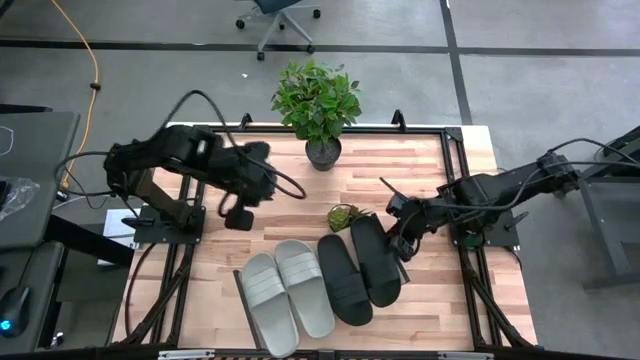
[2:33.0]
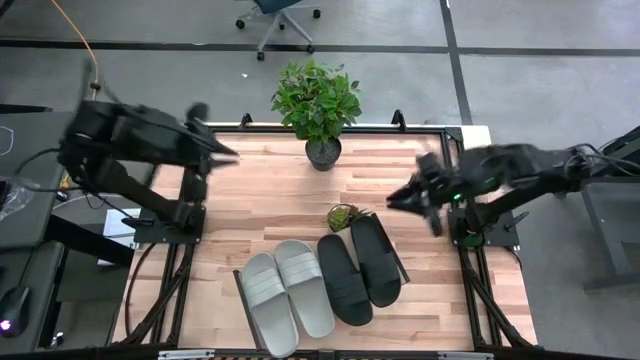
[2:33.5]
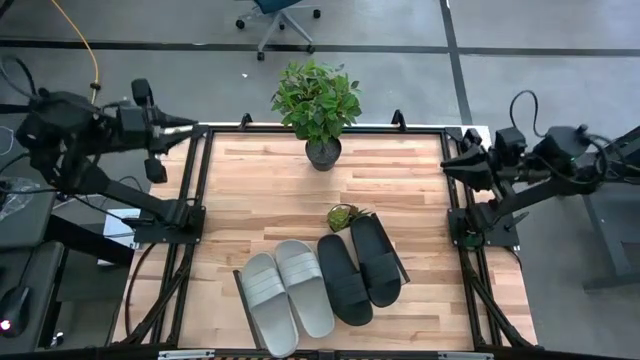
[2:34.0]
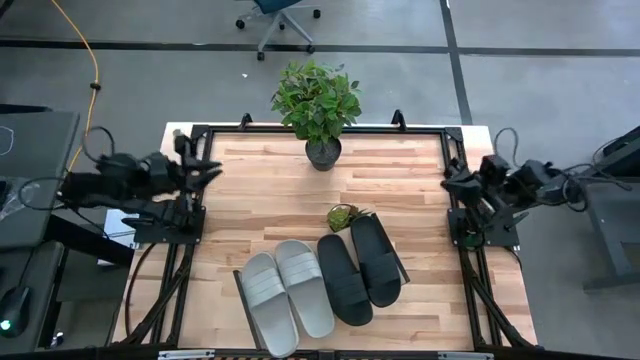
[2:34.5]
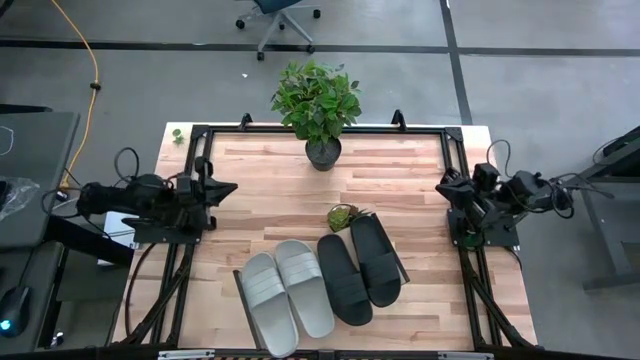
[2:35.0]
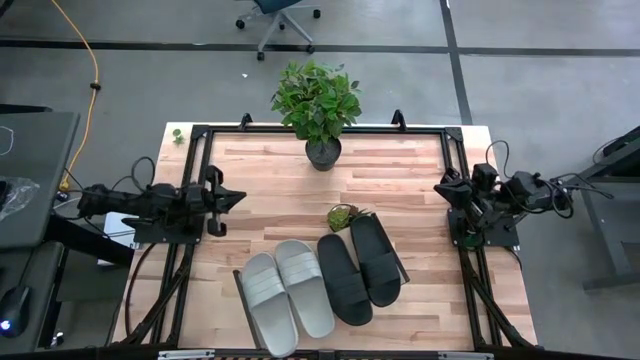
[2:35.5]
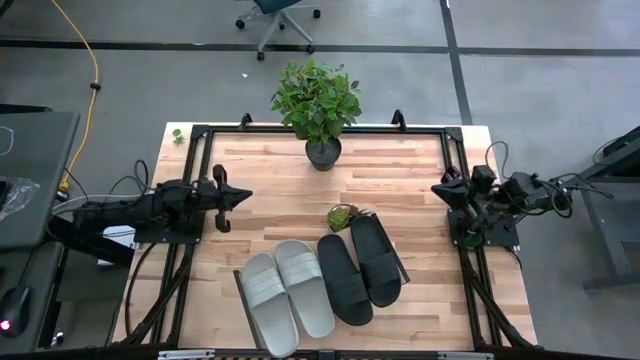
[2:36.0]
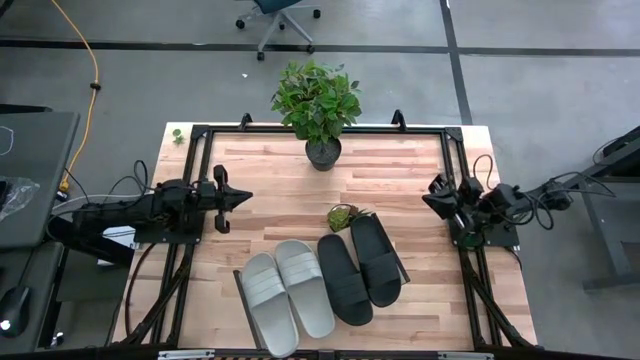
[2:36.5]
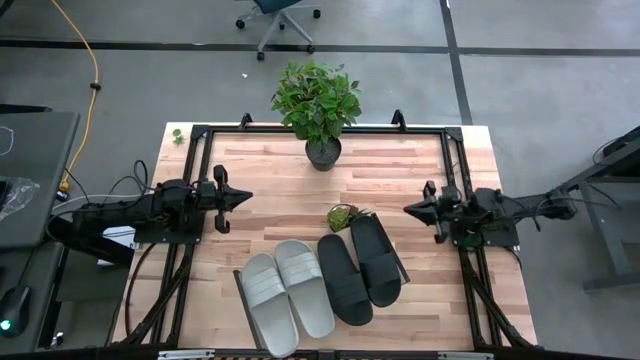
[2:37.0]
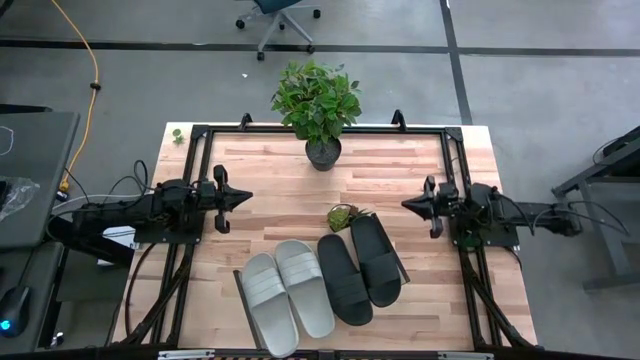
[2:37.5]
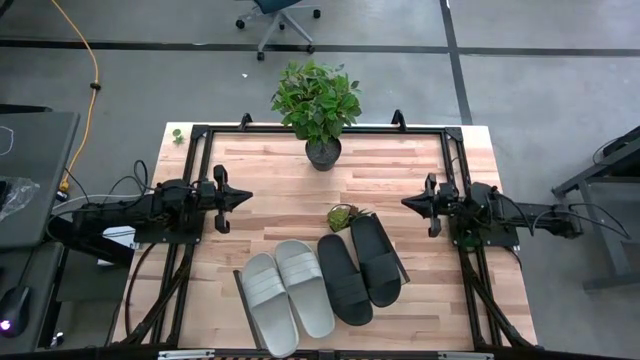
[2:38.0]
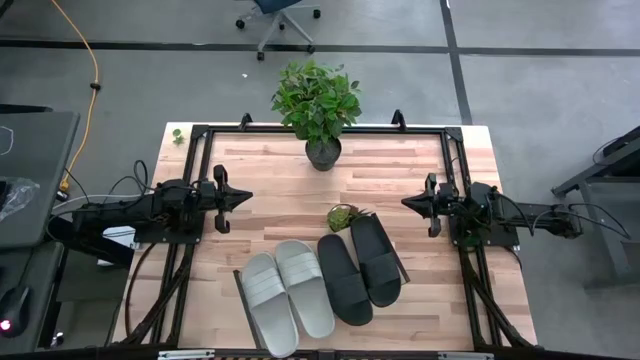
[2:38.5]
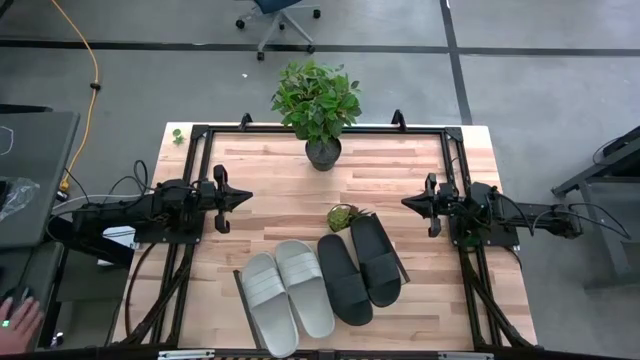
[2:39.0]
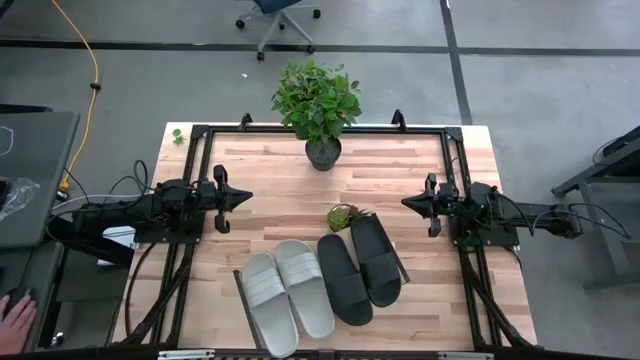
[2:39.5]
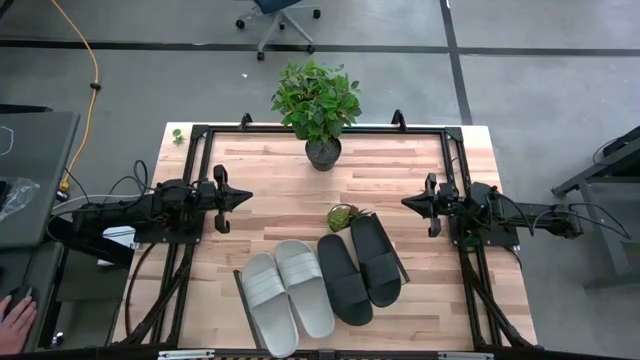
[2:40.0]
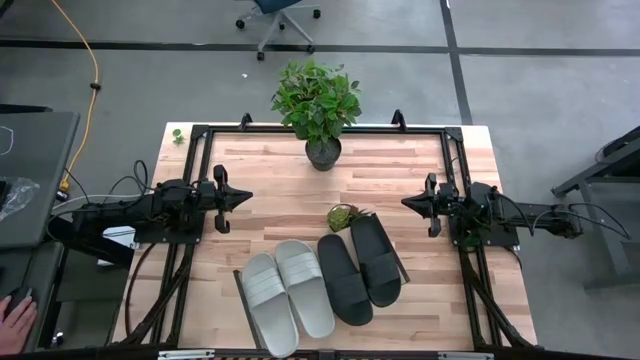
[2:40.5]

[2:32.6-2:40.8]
Task: Pick and place slides into the shelf
Return to Home Position

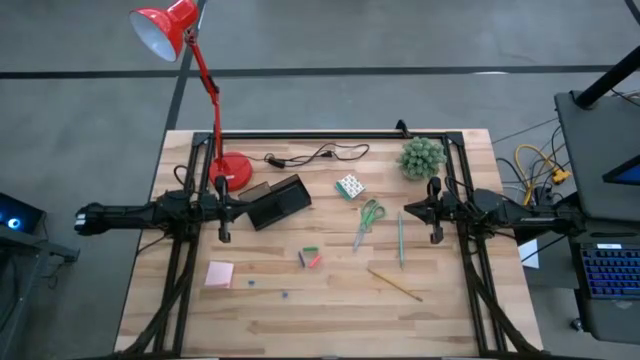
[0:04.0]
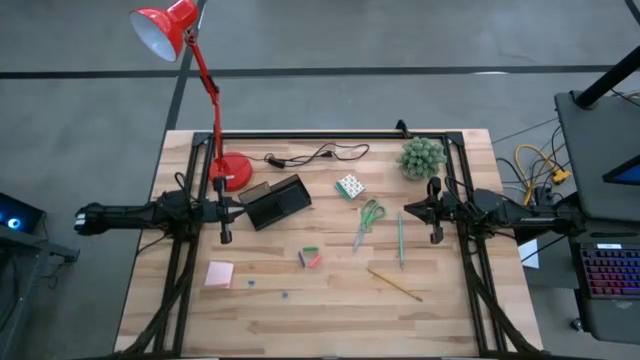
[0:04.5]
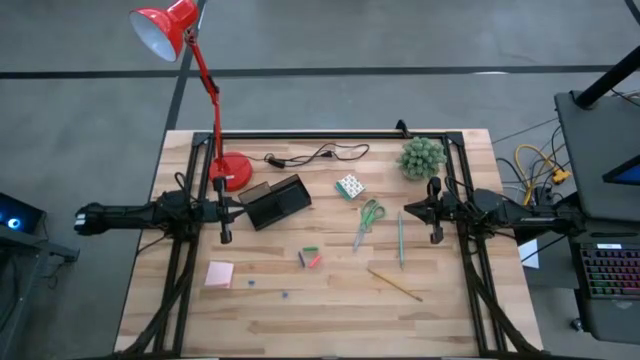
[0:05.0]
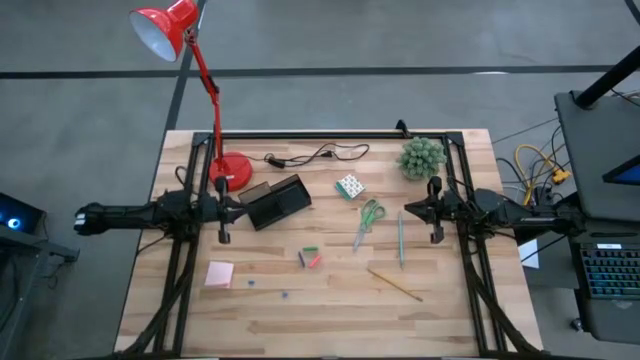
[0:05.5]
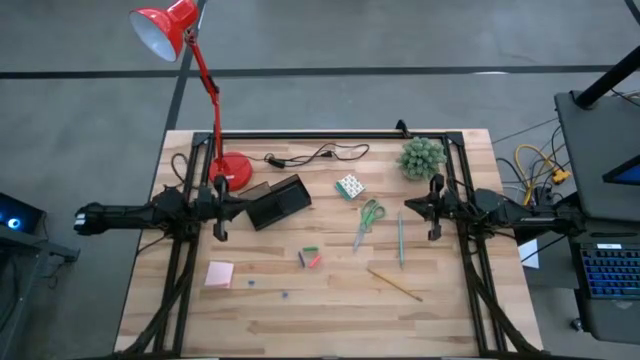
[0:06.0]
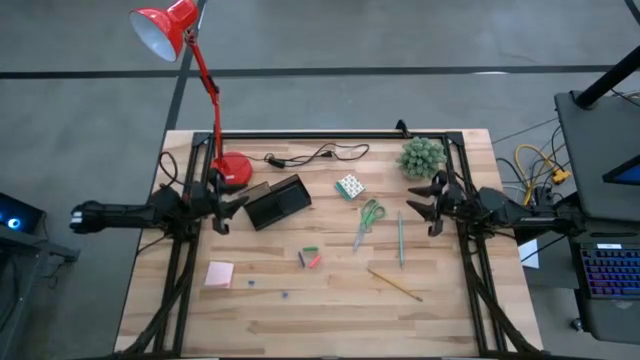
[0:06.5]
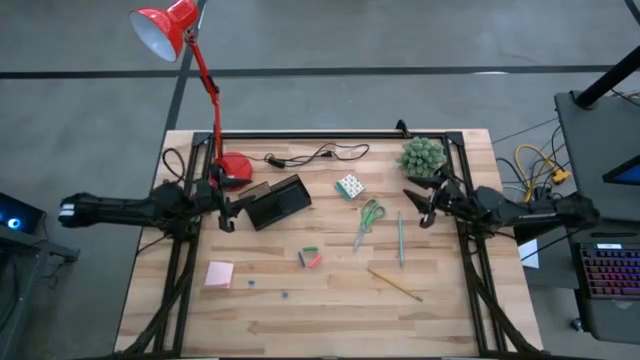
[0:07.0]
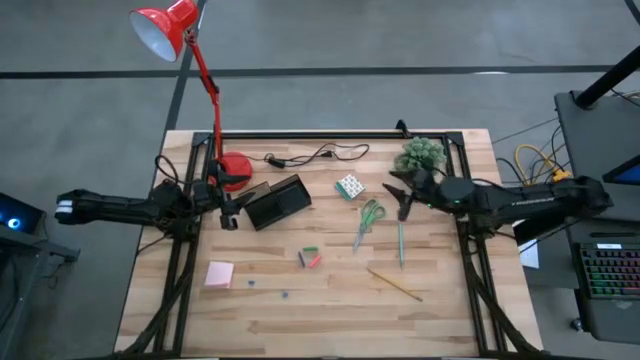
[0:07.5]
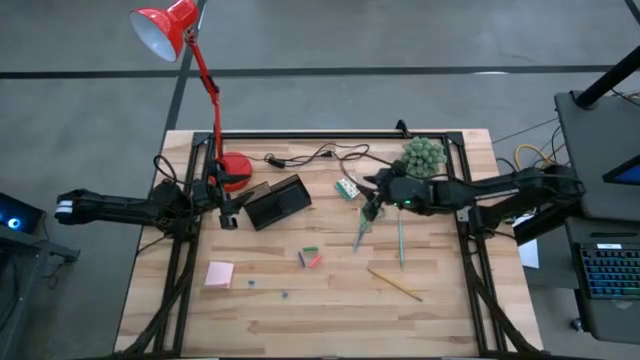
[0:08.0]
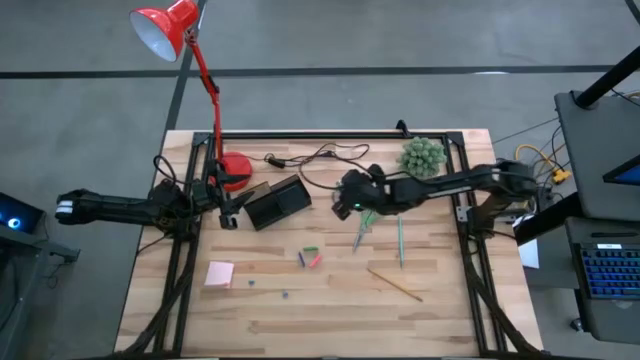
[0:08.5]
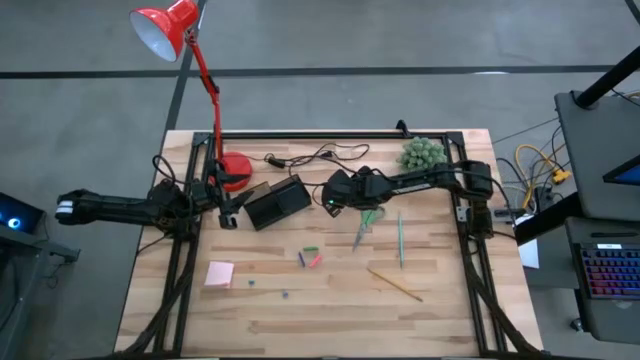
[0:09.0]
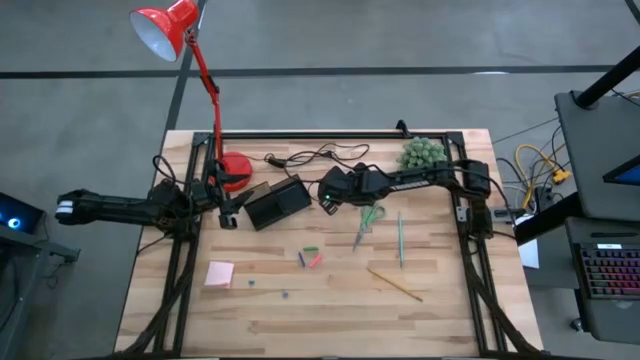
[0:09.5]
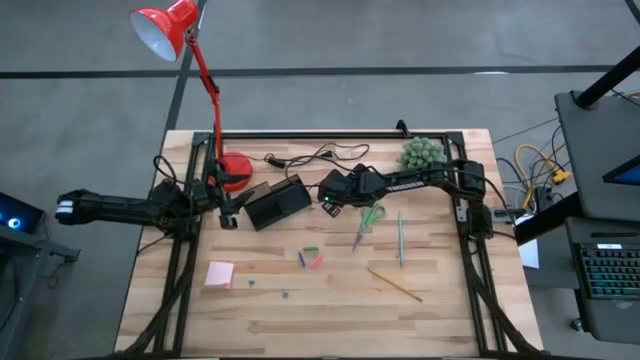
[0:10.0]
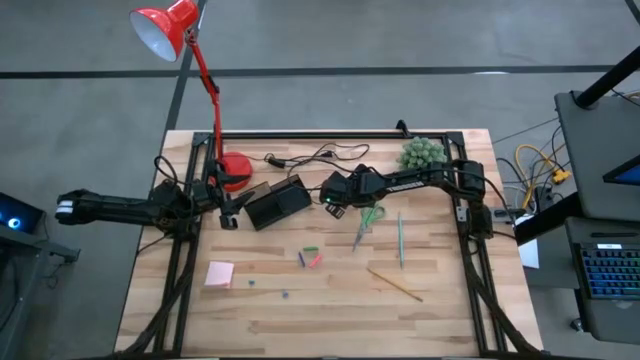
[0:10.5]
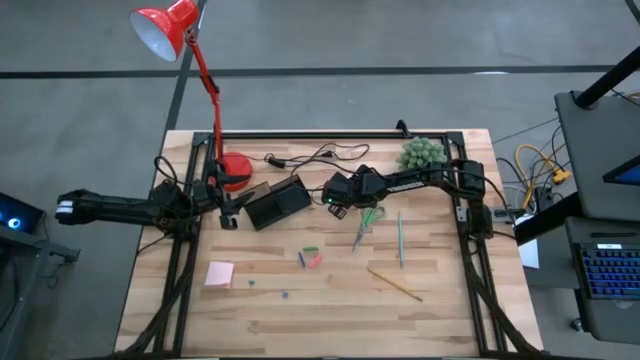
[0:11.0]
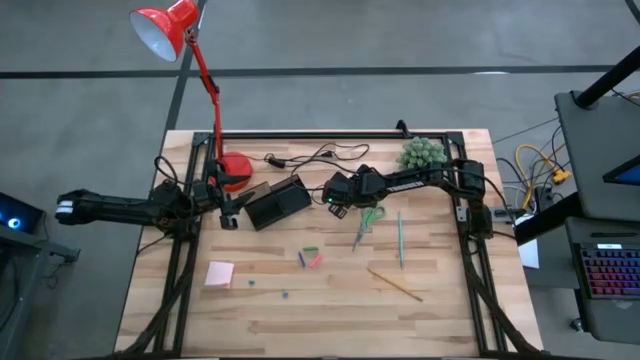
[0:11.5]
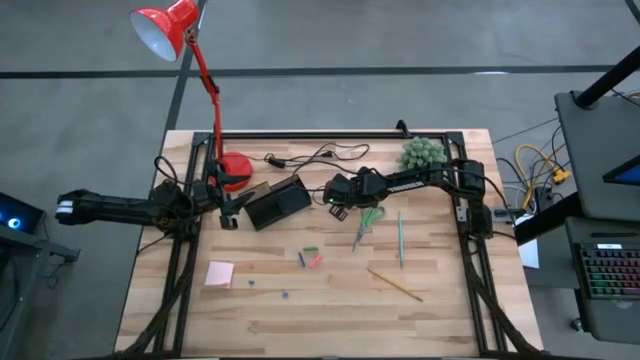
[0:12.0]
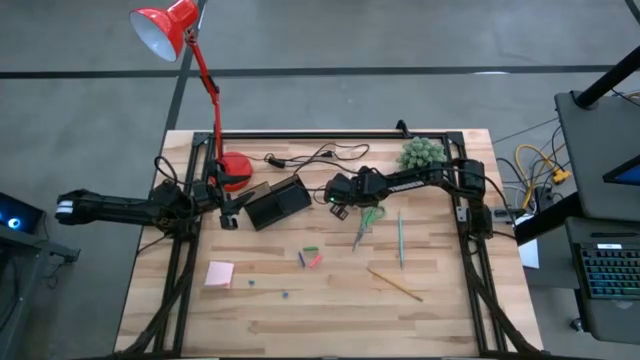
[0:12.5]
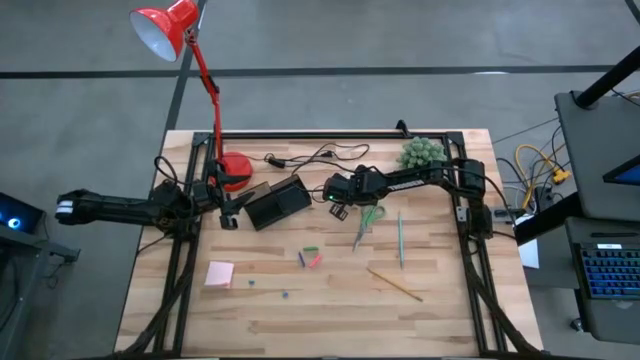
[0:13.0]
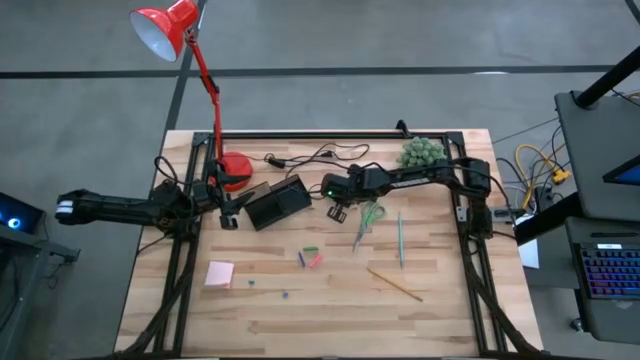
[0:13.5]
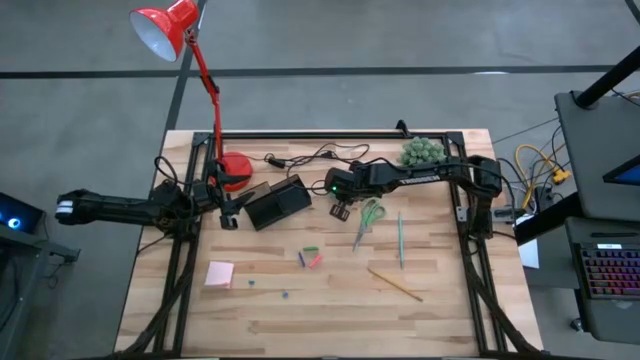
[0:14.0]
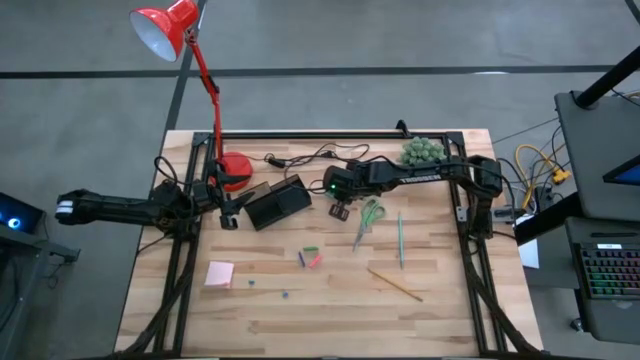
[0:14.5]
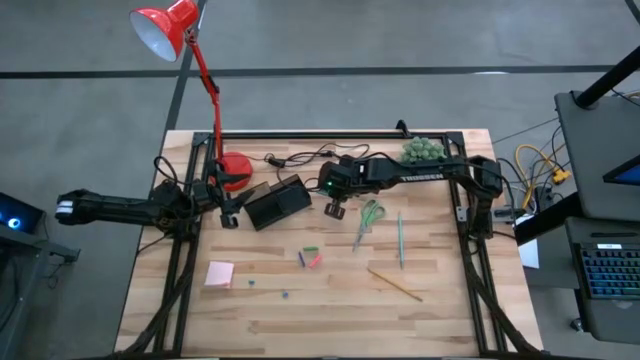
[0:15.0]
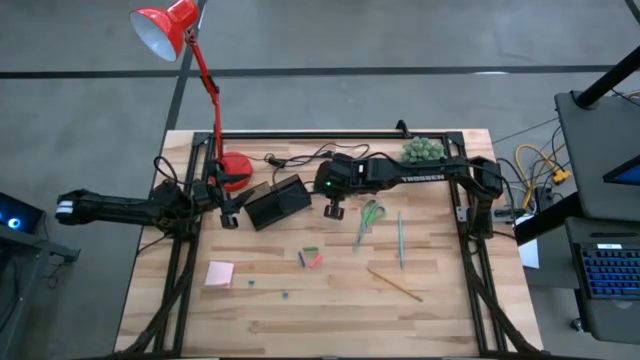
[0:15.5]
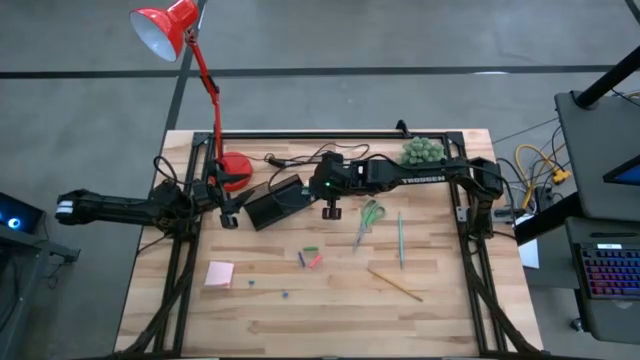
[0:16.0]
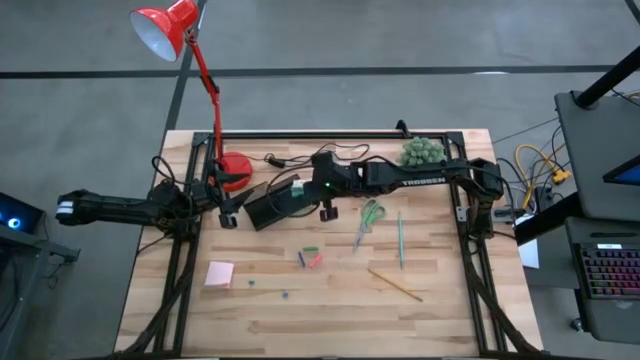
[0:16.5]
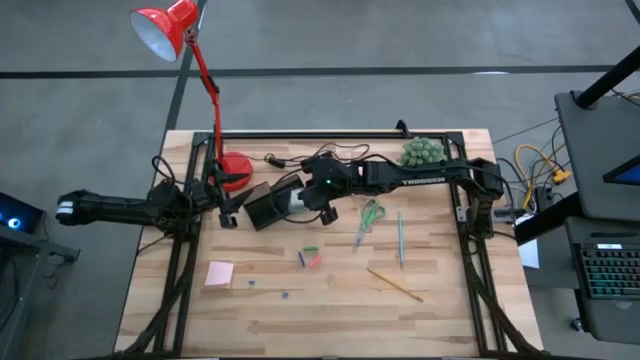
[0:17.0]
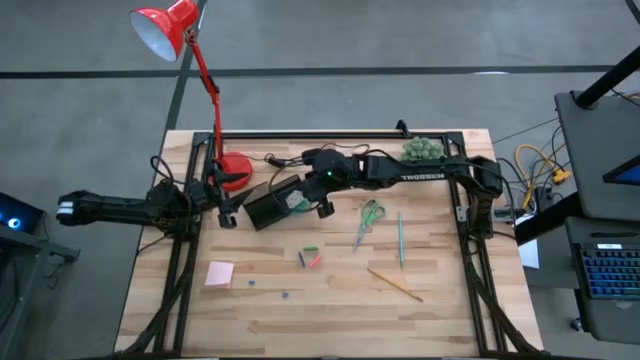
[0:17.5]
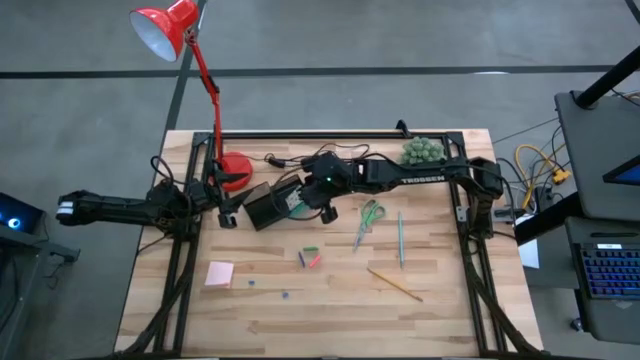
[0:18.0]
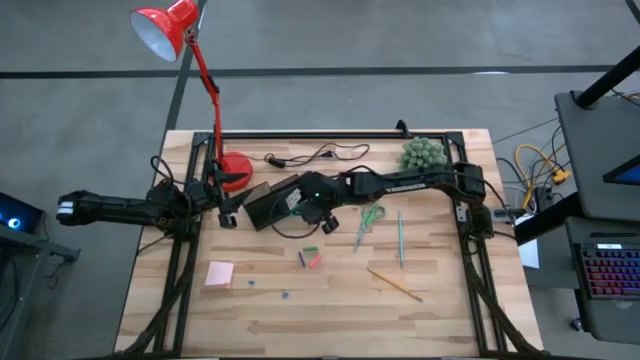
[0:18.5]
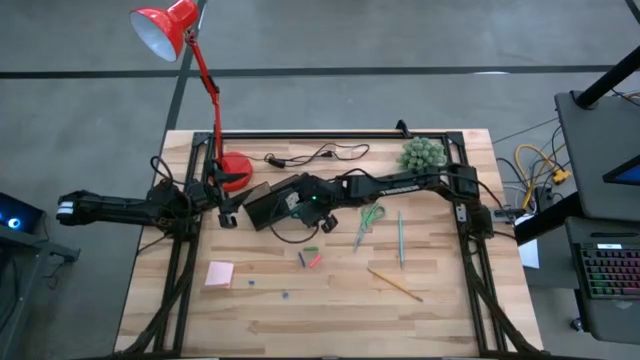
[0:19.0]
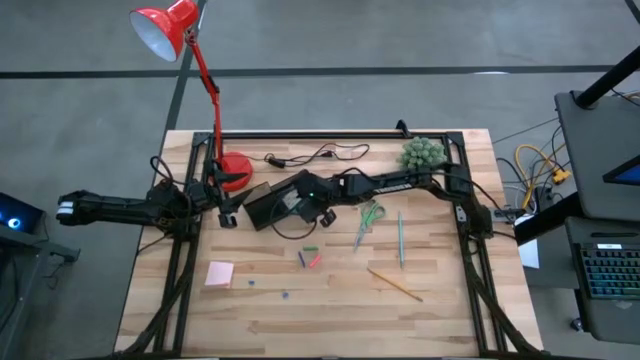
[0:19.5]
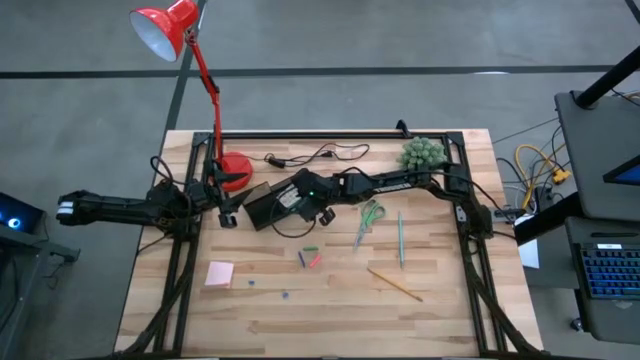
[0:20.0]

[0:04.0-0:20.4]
Task: Pick and place office supplies into organizer
Put the blue sticky notes into the desk organizer
